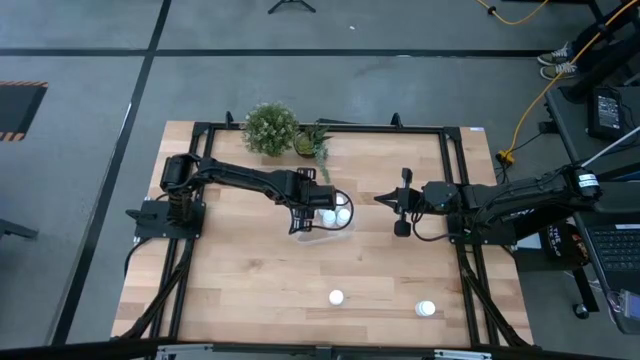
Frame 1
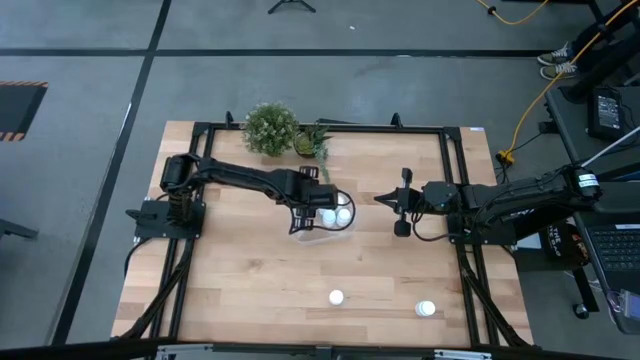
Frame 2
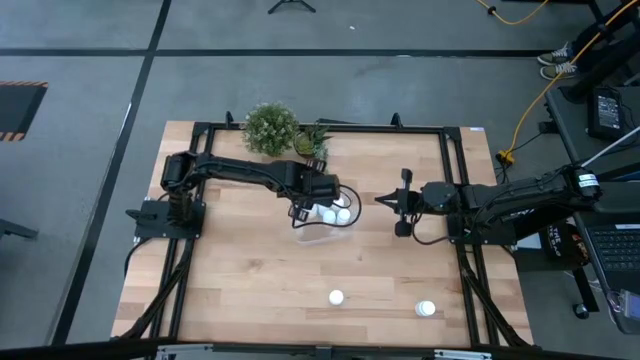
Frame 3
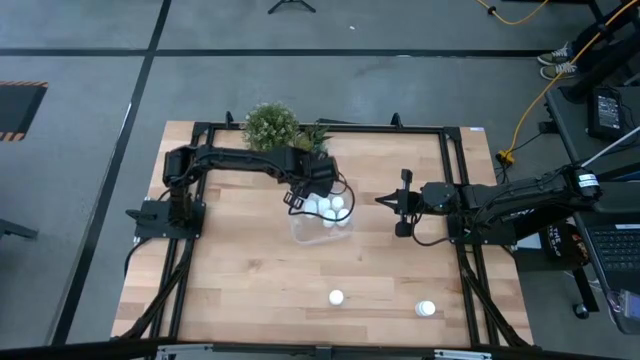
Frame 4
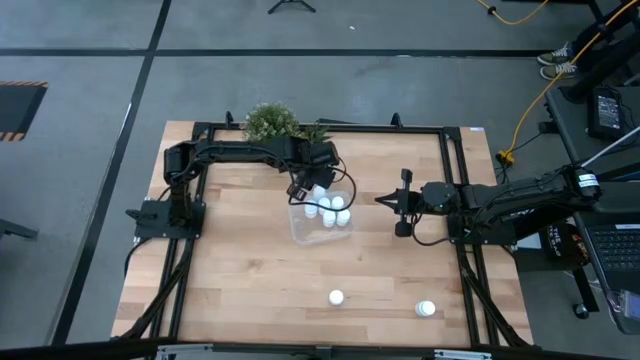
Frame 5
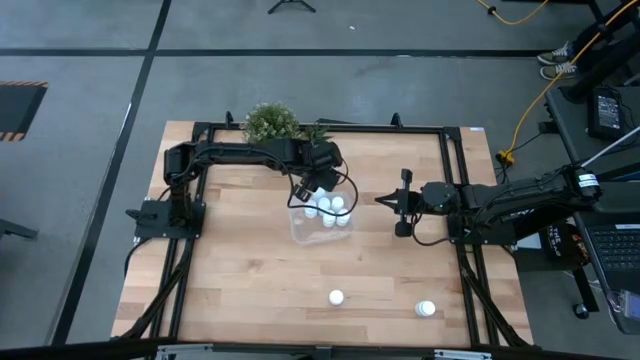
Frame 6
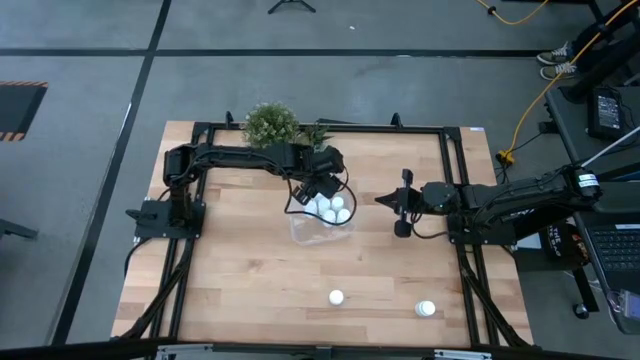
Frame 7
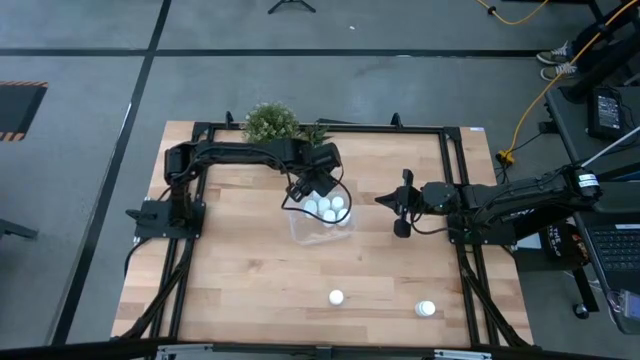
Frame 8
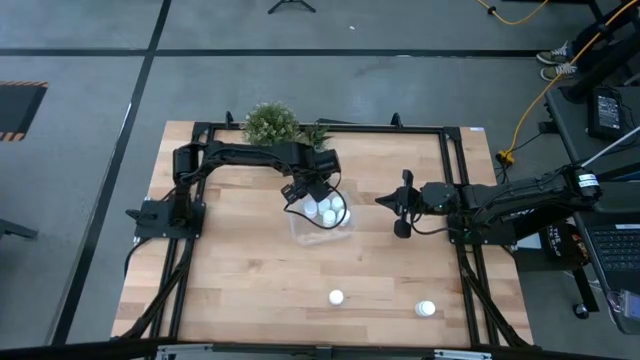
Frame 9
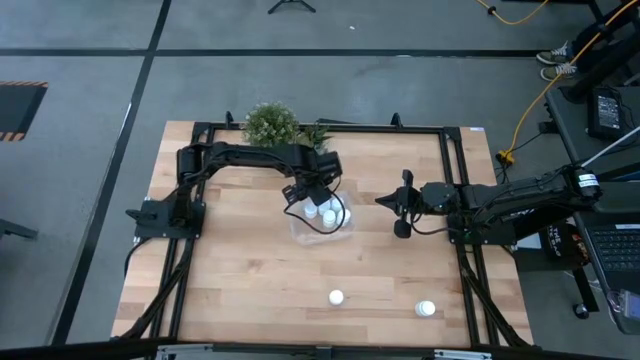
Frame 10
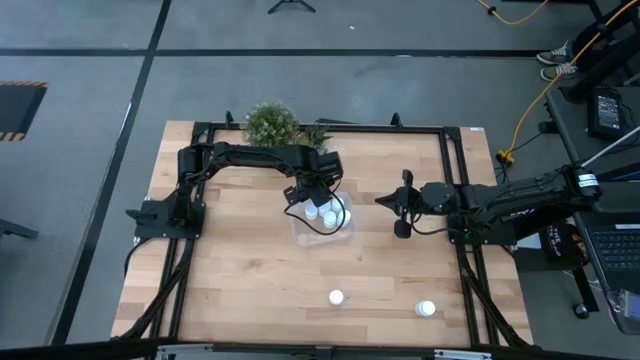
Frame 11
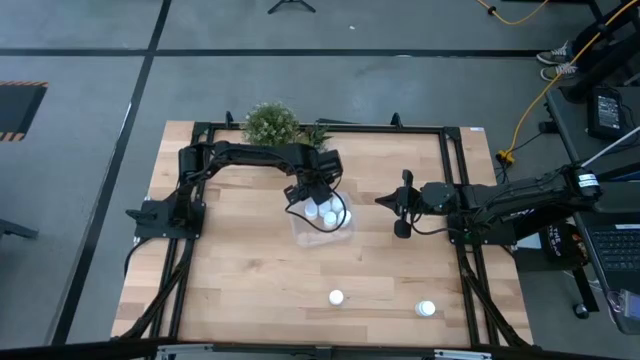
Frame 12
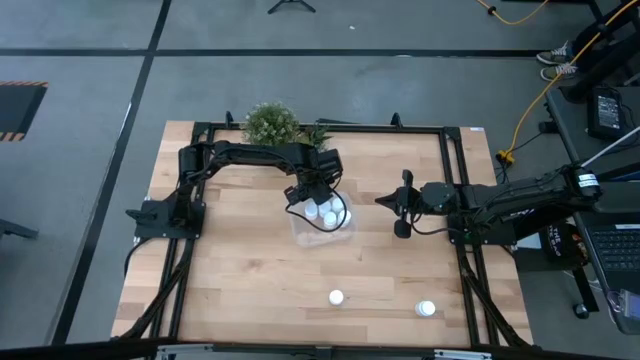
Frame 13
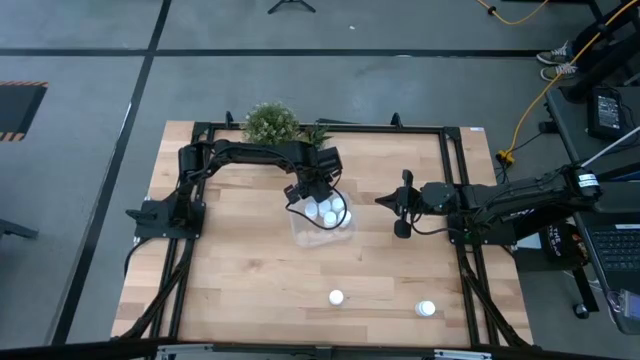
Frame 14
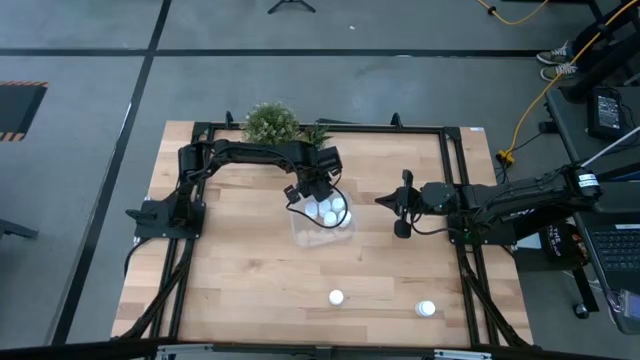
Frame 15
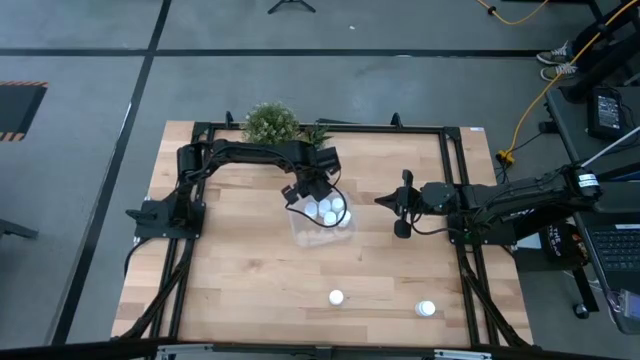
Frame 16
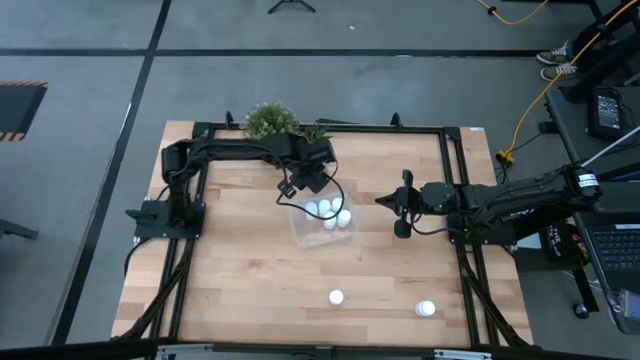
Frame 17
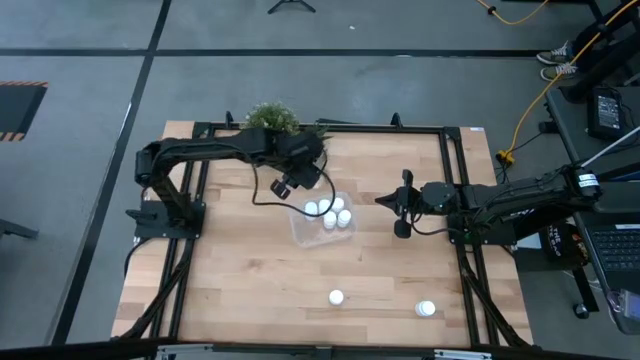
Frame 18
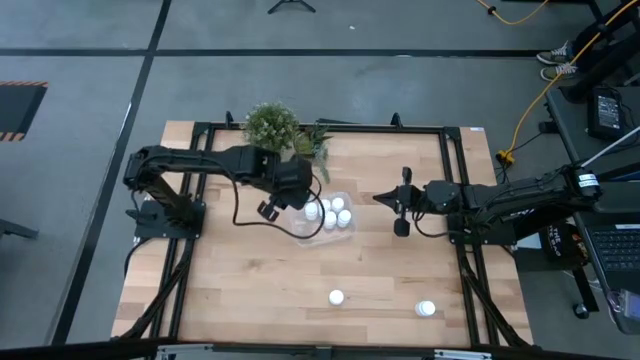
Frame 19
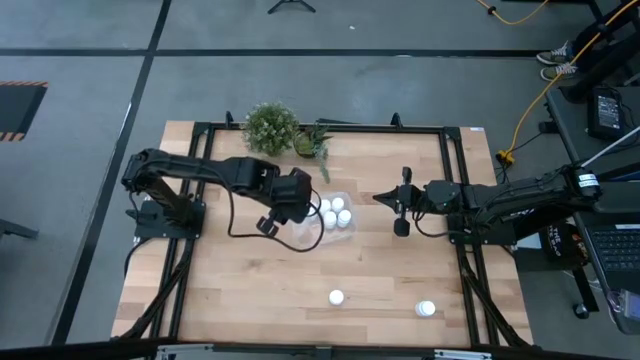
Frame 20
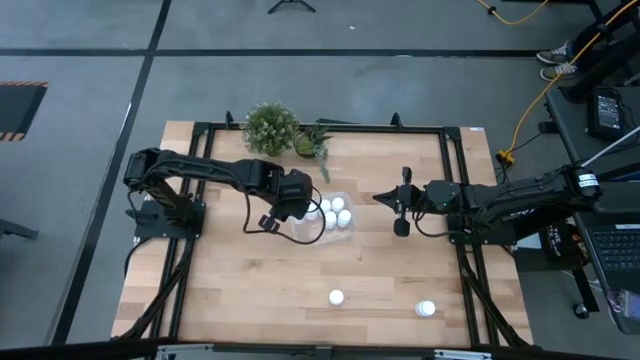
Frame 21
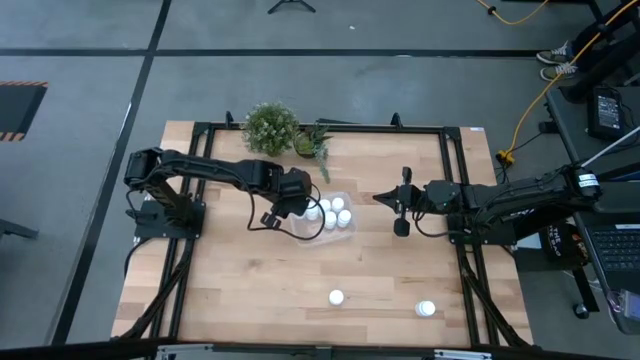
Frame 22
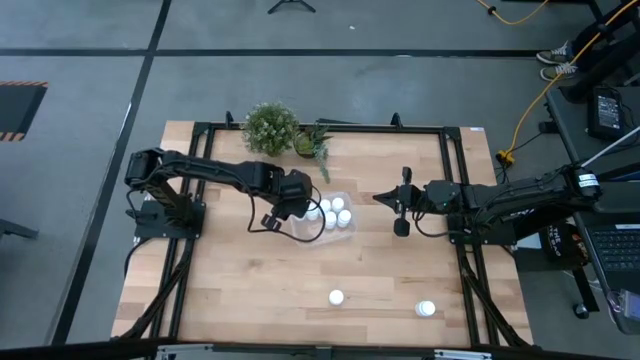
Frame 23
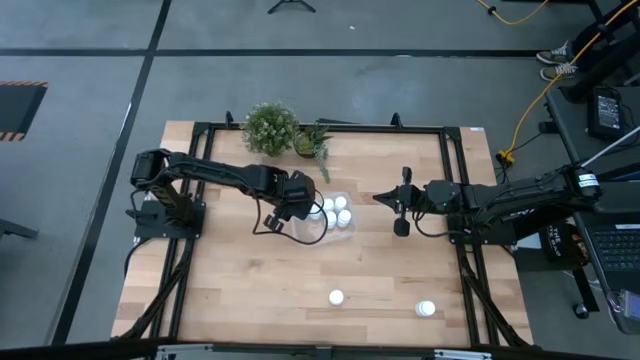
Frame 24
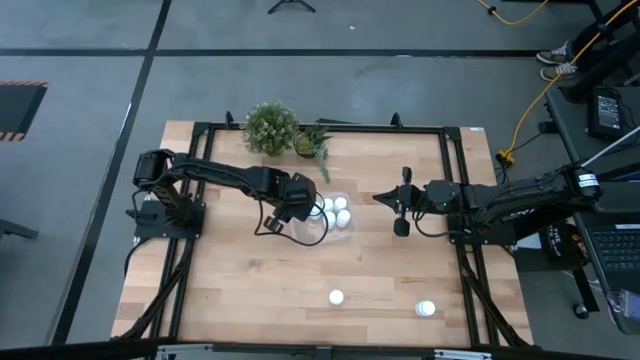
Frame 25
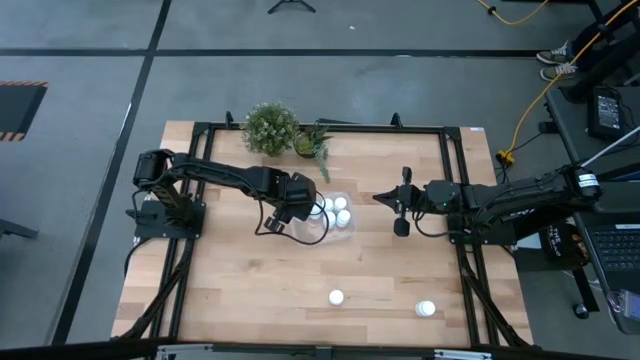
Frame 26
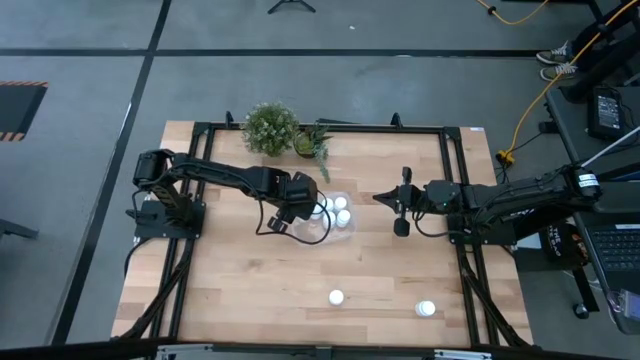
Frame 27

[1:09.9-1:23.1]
Task: Pick and place pill bottles into a basket
Put the white pill bottle into the transparent bin

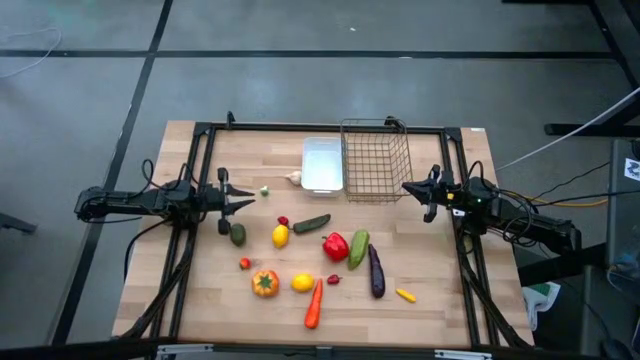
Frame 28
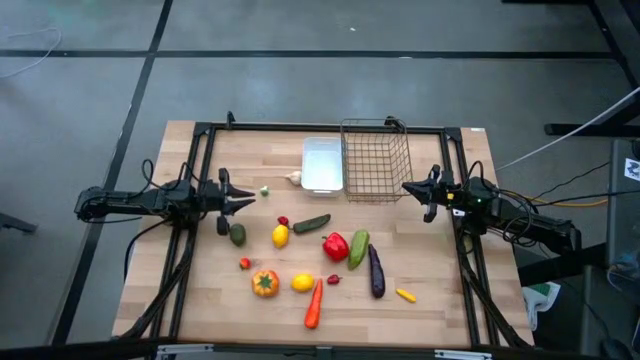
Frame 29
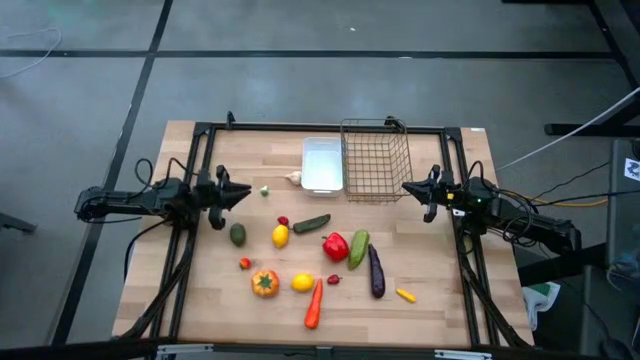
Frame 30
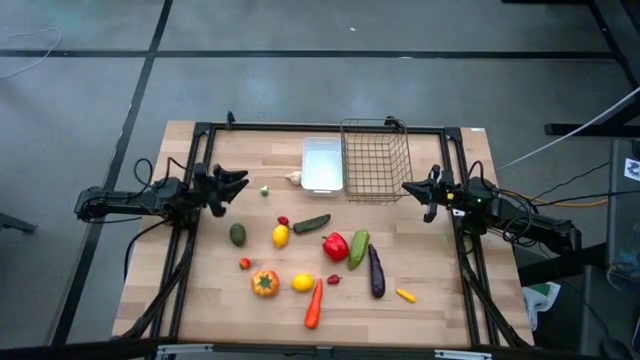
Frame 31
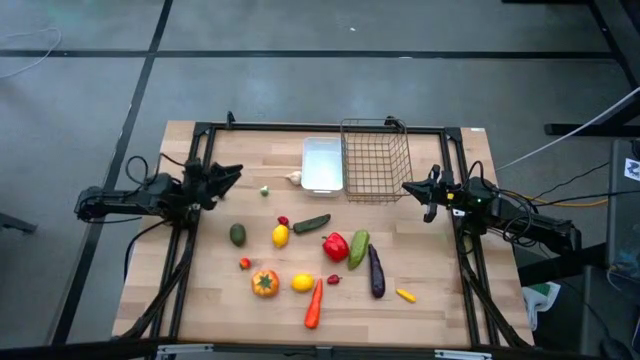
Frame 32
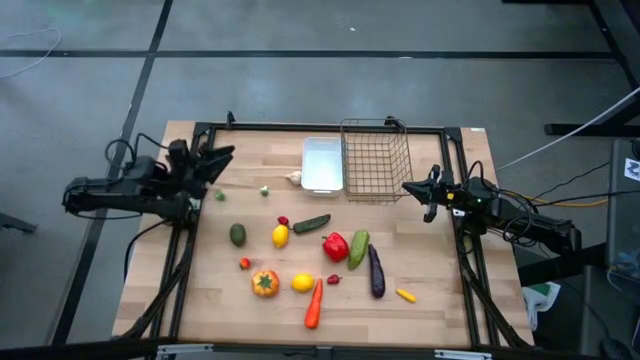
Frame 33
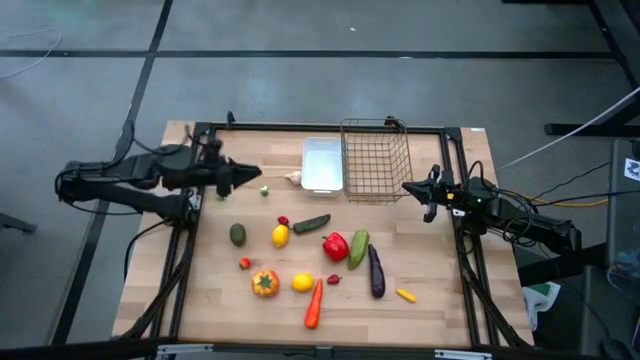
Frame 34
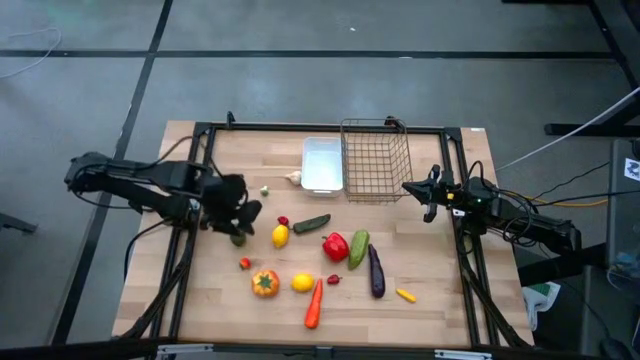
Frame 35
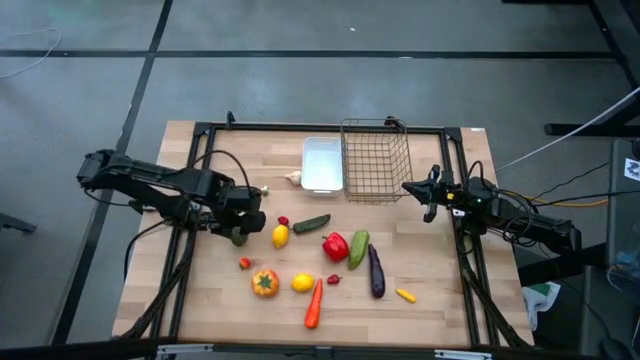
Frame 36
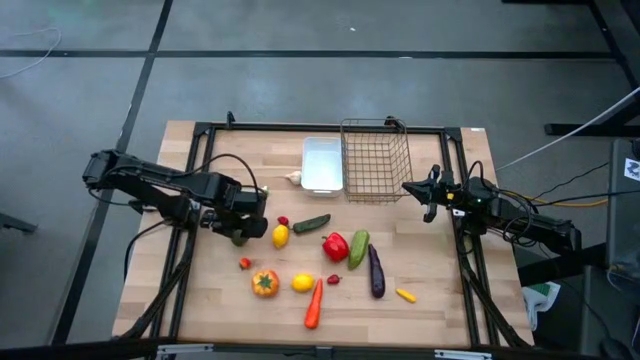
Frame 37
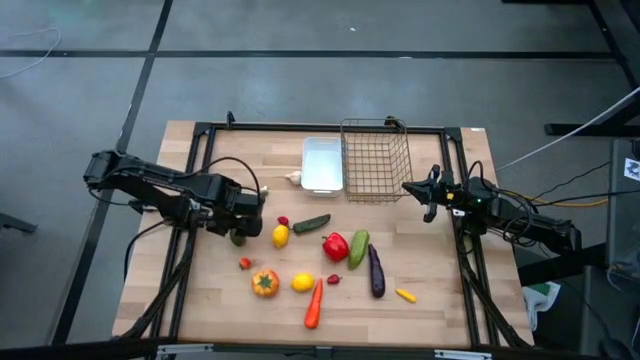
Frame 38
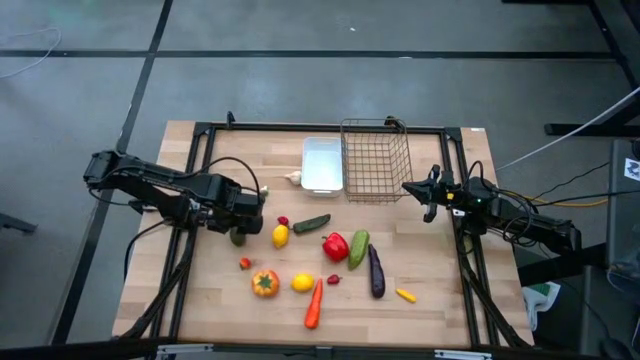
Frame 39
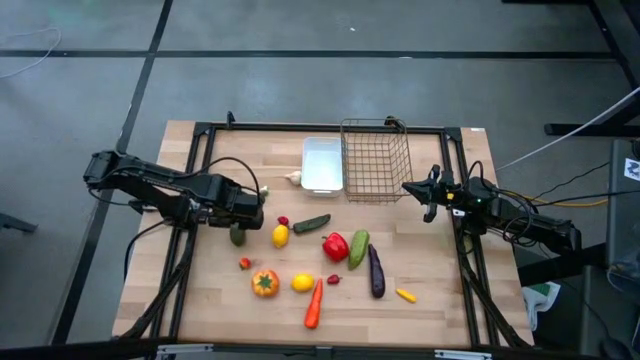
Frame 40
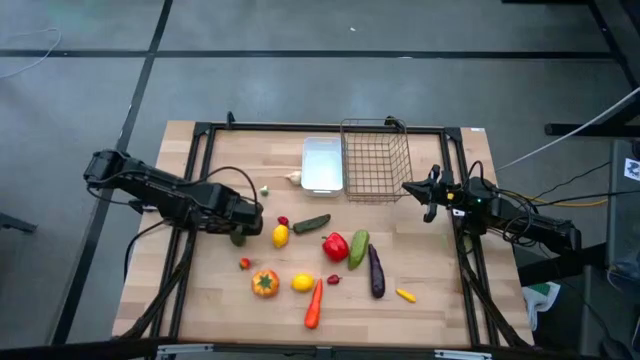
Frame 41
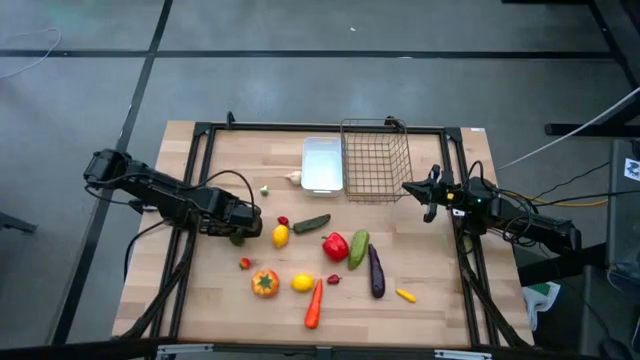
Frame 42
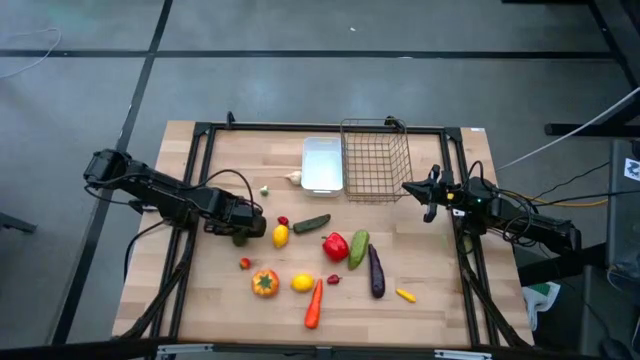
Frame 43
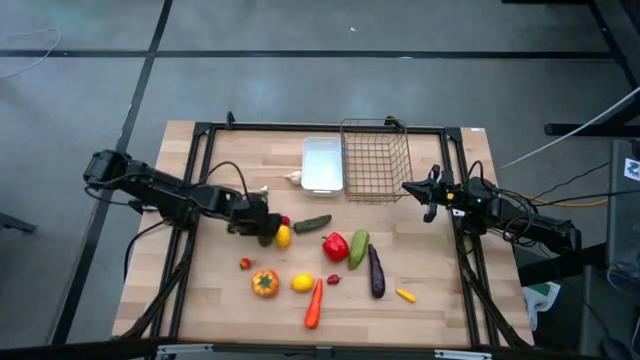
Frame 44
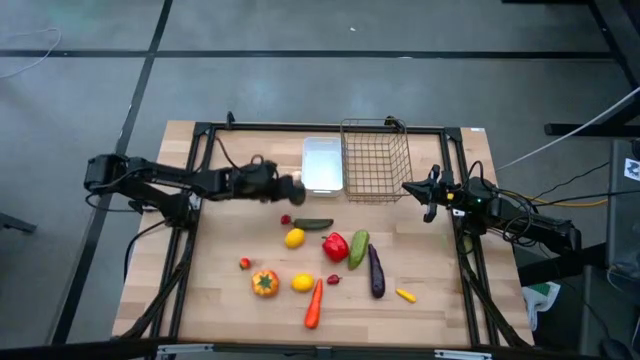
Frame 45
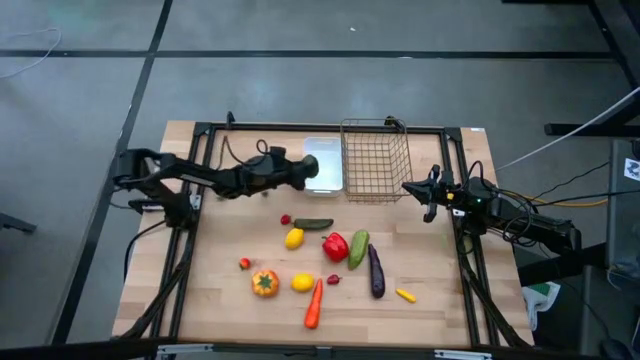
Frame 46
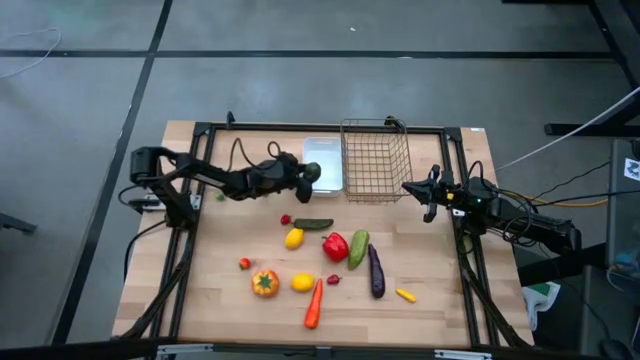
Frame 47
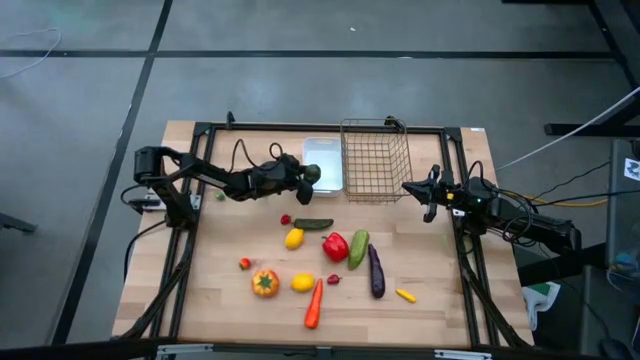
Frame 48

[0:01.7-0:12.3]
Task: Sort produce into baskets
Put the green lime into the white bin
